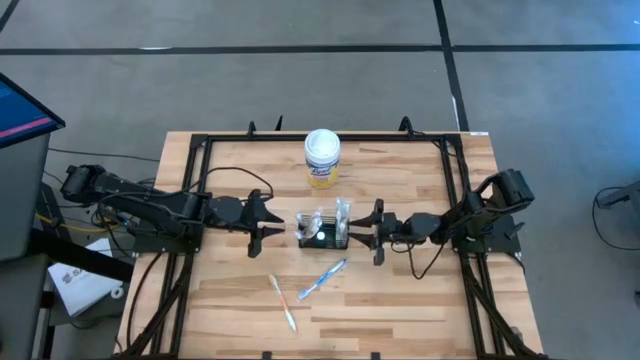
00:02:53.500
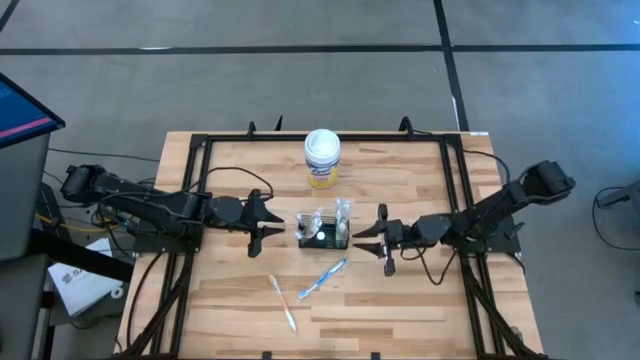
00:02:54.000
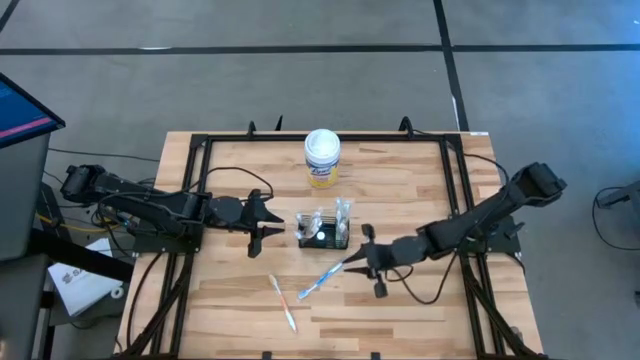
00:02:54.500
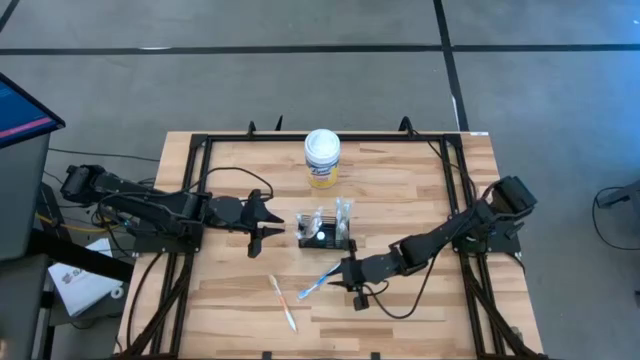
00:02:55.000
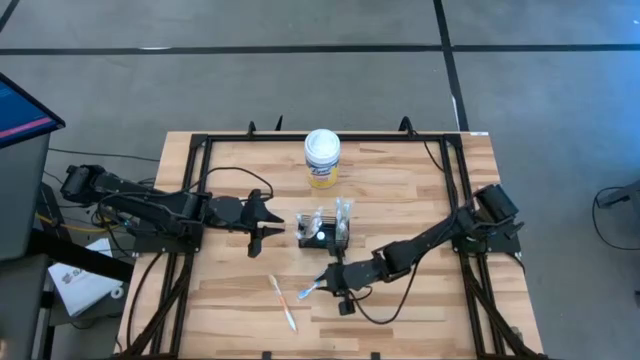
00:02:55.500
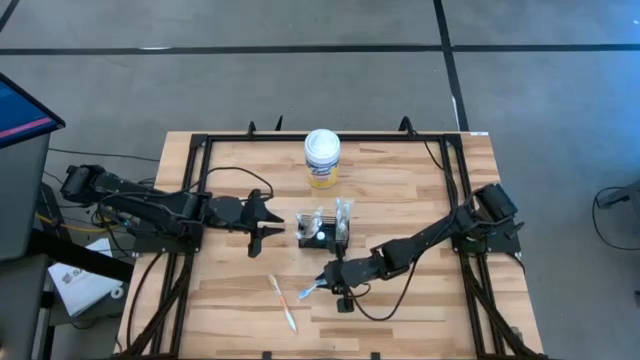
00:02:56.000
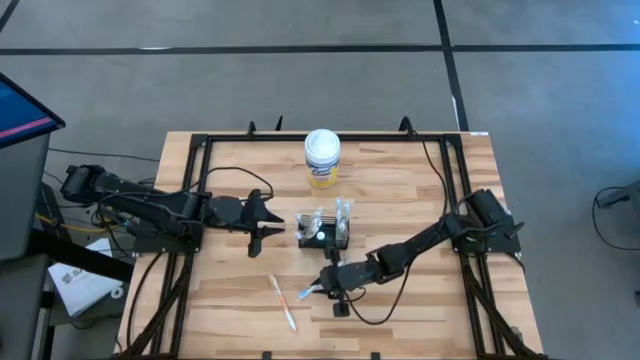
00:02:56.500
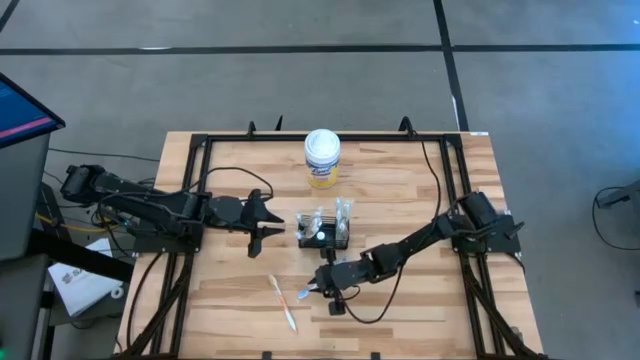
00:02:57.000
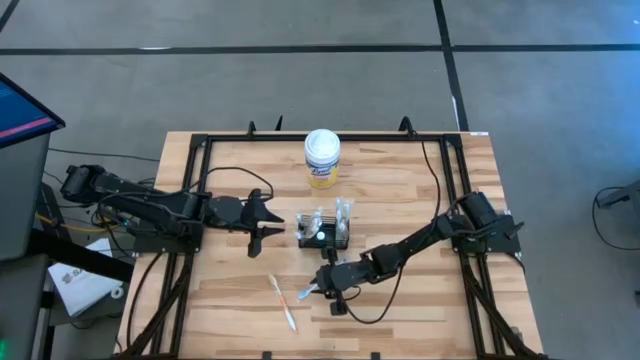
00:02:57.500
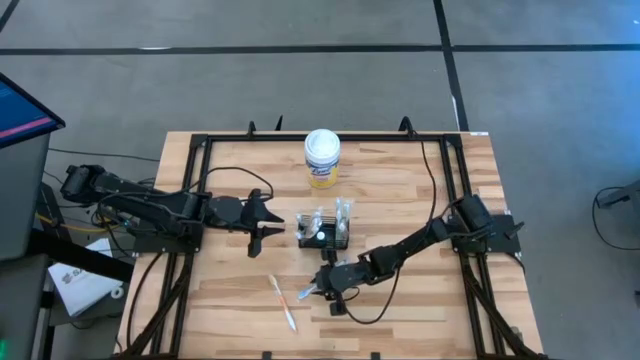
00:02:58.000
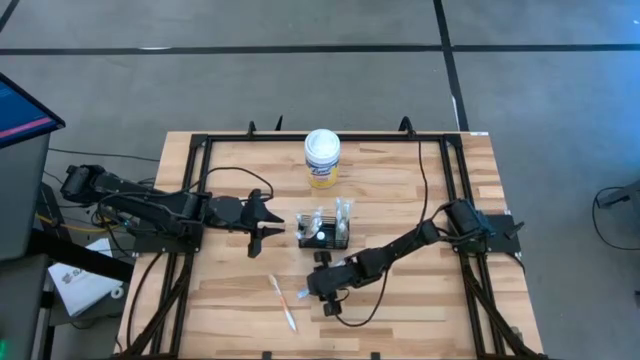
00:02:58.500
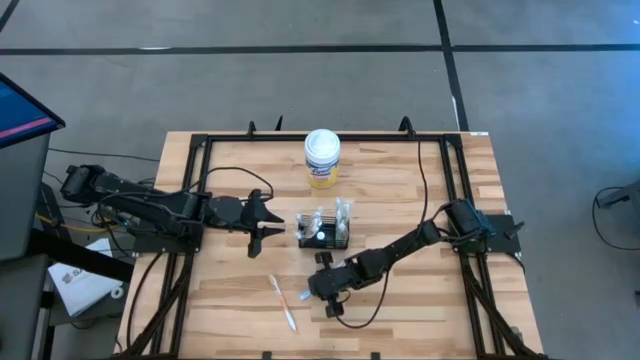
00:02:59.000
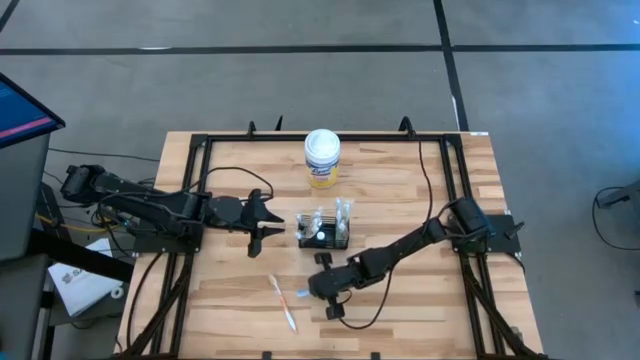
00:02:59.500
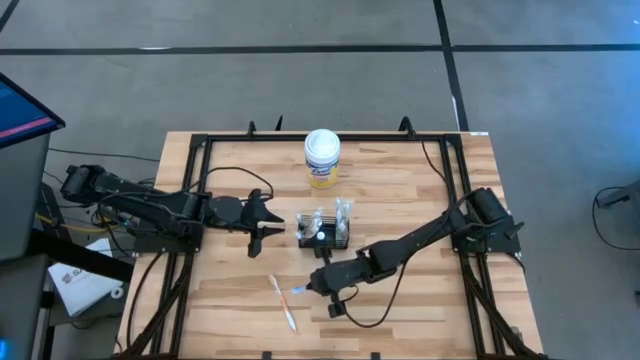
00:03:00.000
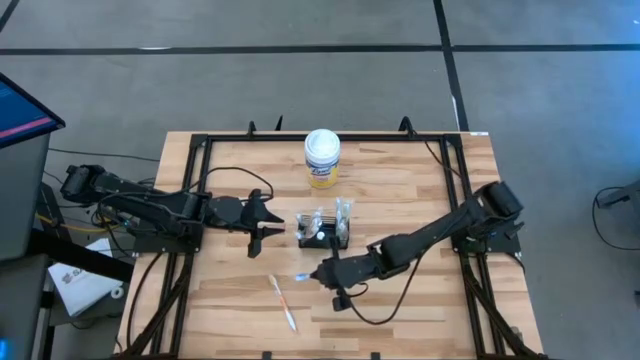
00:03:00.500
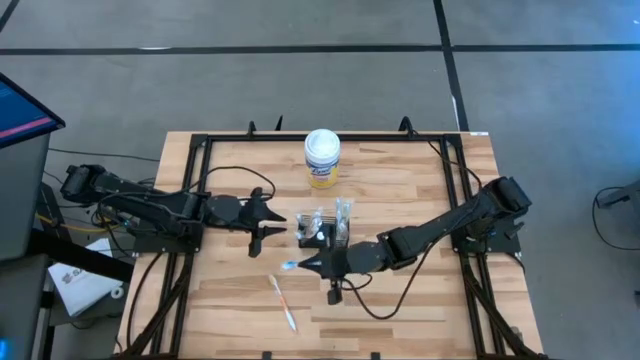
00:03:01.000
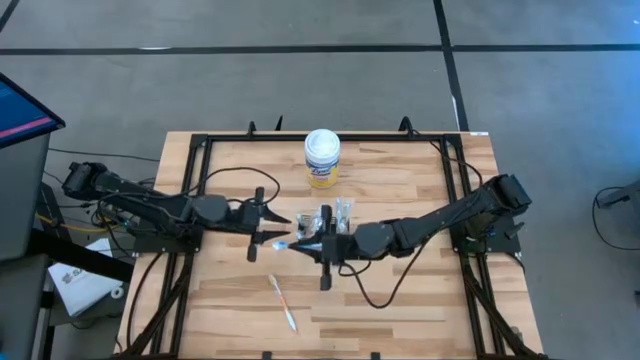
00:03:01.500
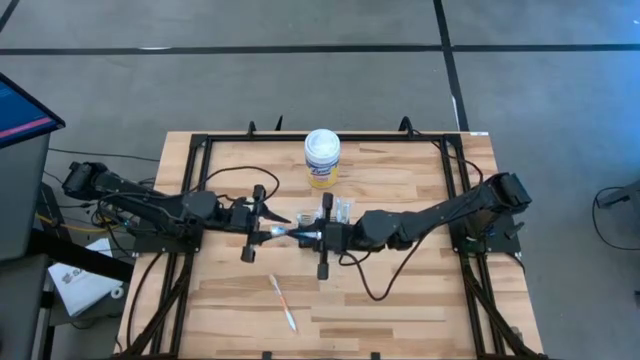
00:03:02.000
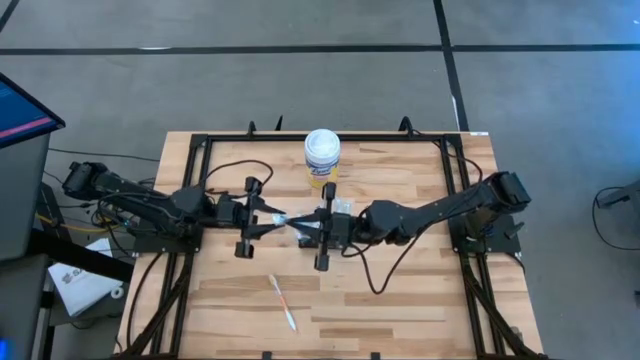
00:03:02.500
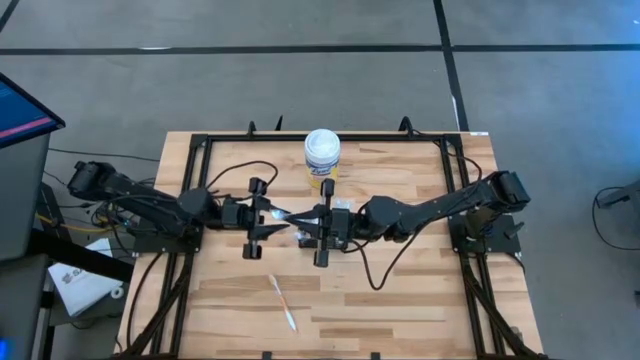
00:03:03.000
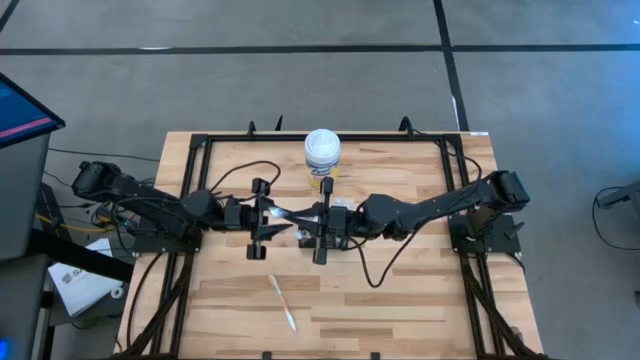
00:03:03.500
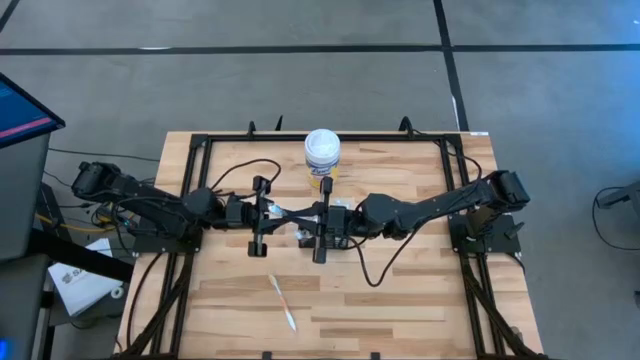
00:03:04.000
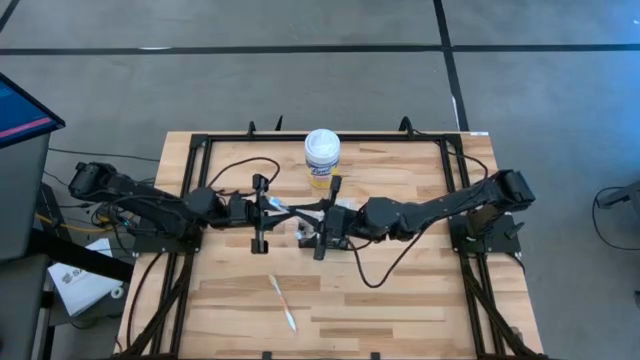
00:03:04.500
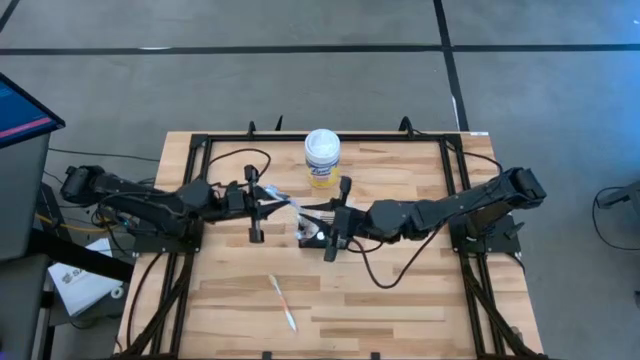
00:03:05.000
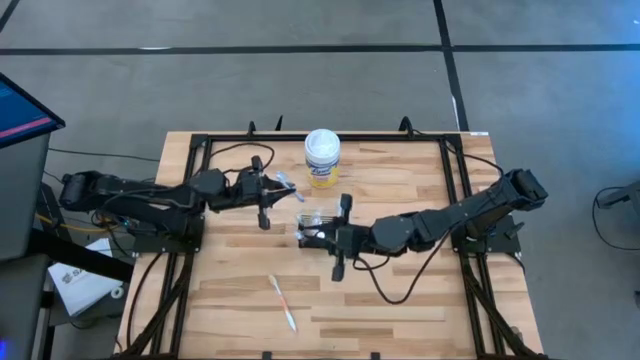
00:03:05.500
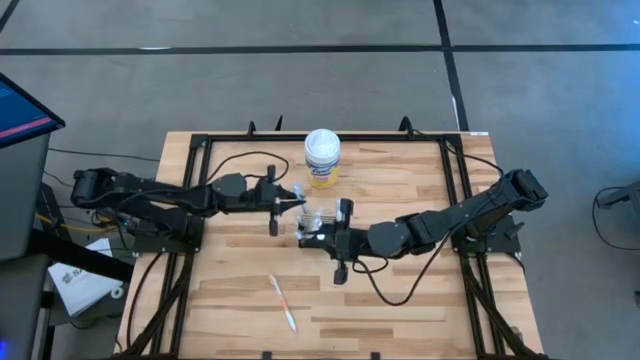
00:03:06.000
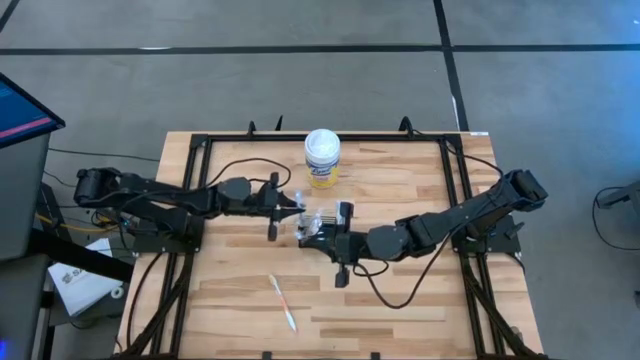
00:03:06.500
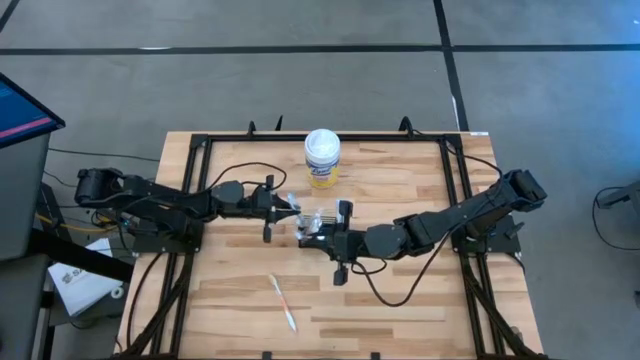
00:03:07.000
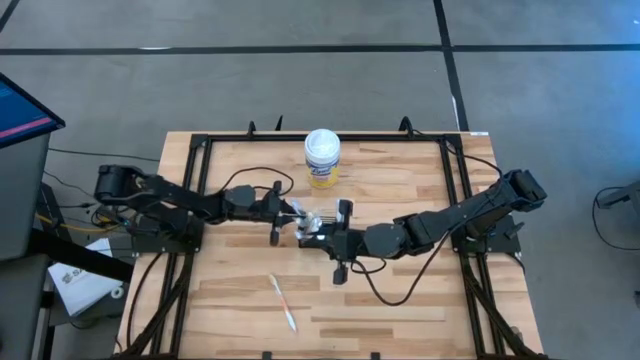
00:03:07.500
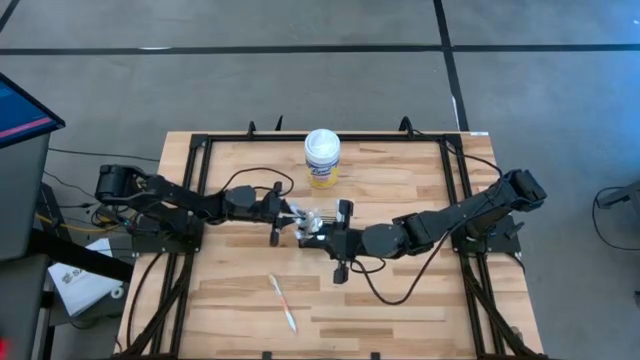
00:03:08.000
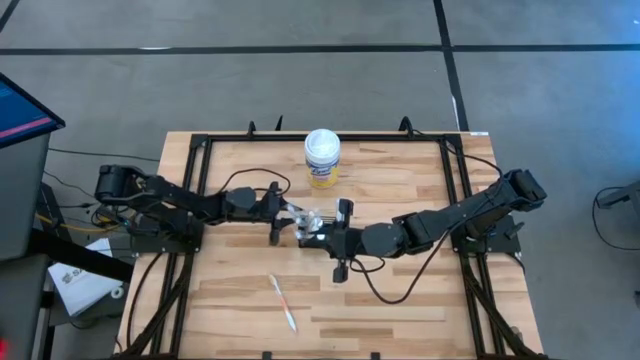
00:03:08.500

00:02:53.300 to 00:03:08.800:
Task: Pick & Place toothbrushing station
Put the blue toothbrush into the black mesh organizer

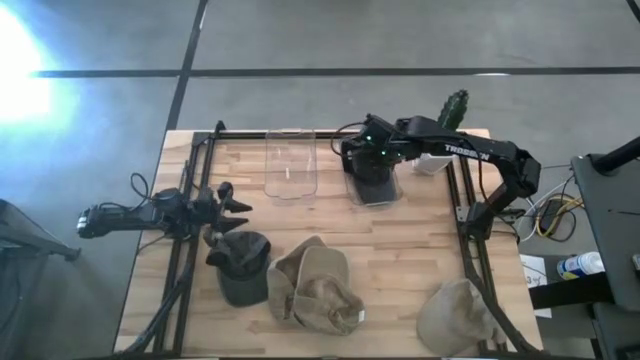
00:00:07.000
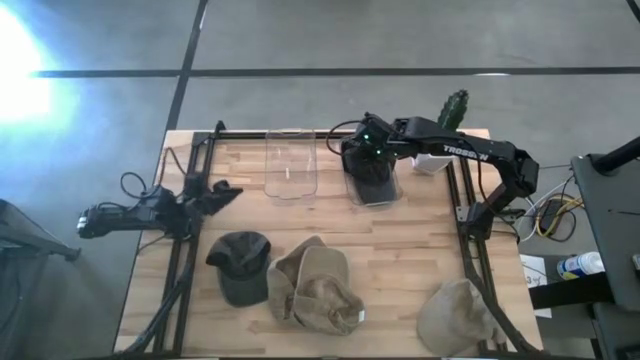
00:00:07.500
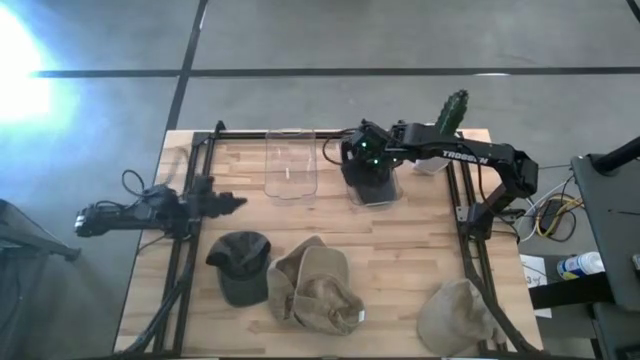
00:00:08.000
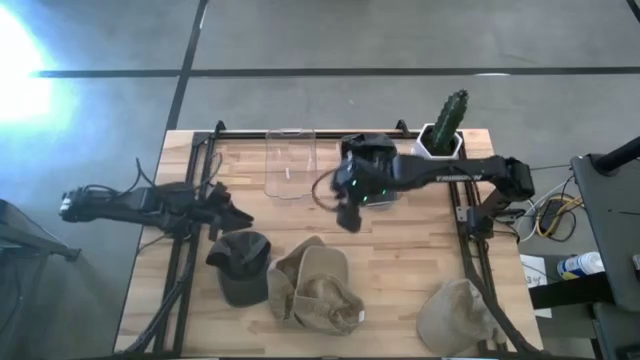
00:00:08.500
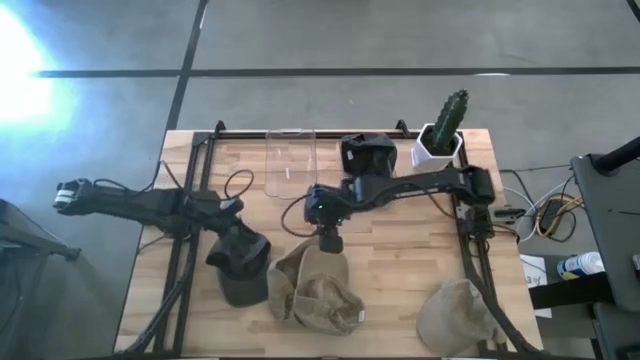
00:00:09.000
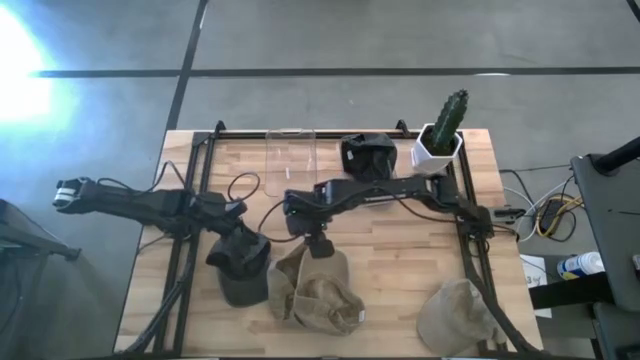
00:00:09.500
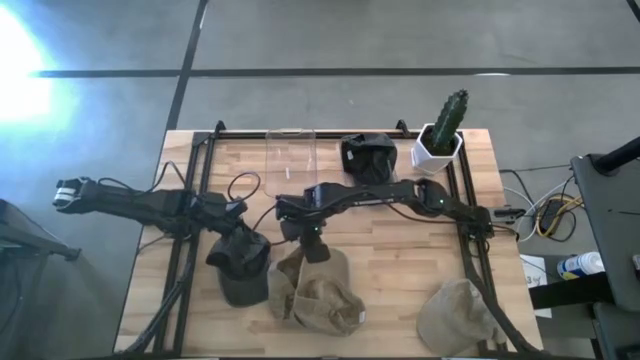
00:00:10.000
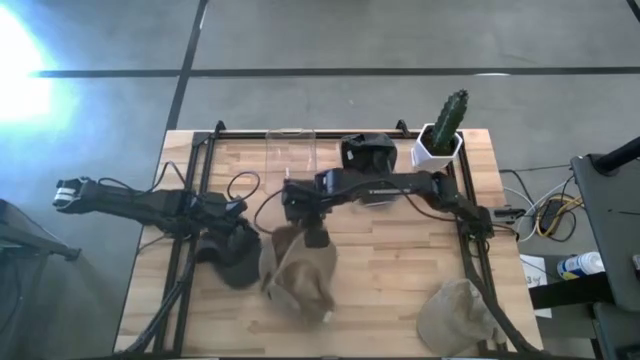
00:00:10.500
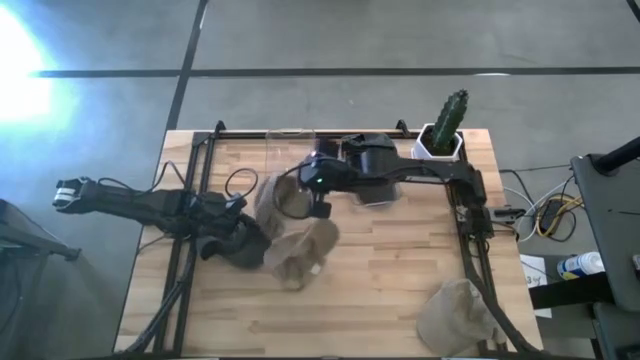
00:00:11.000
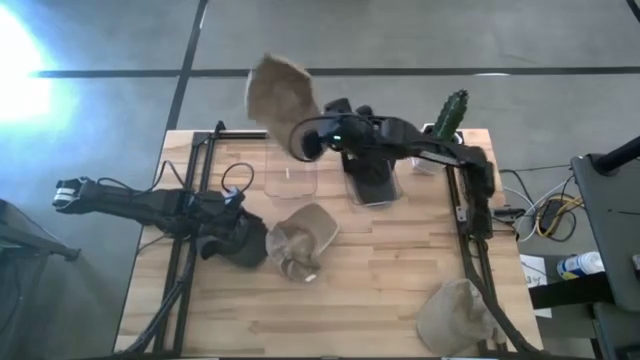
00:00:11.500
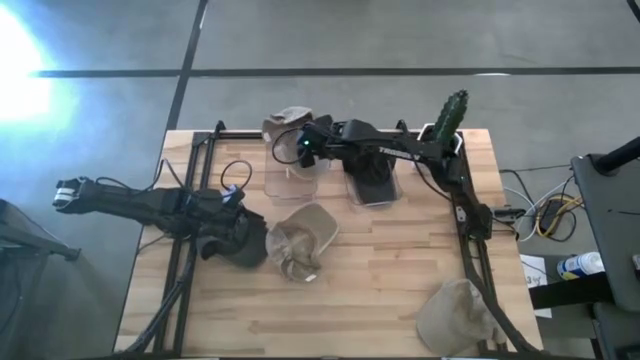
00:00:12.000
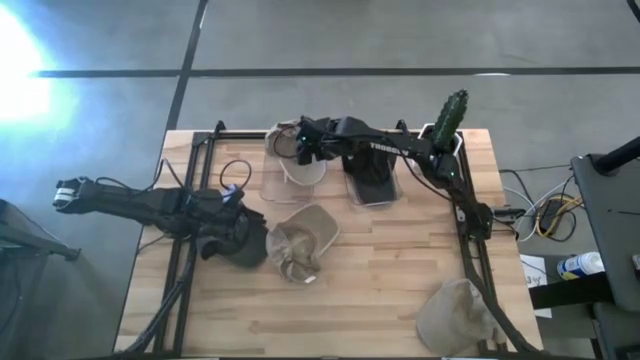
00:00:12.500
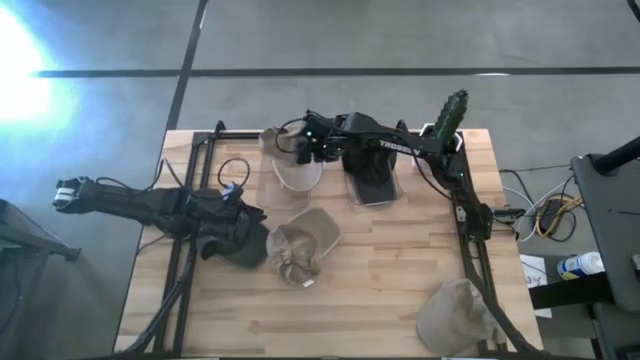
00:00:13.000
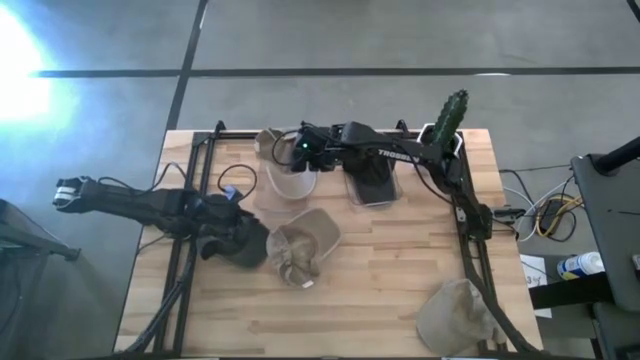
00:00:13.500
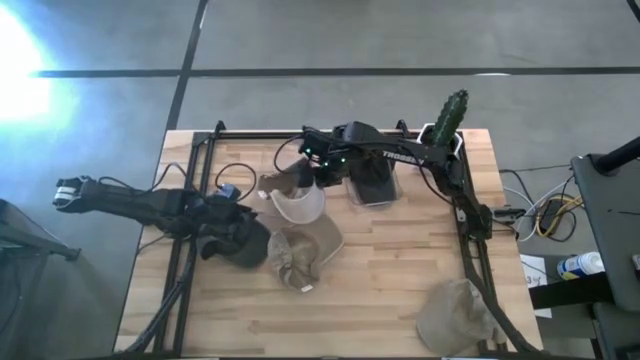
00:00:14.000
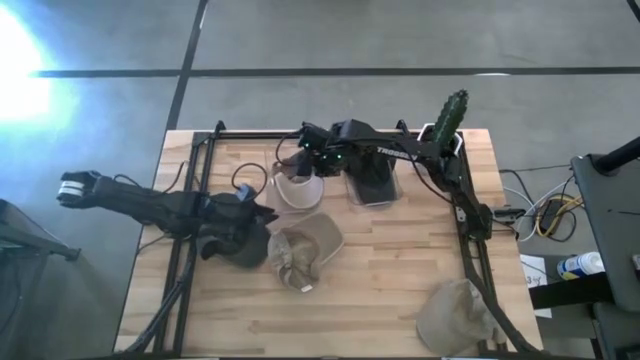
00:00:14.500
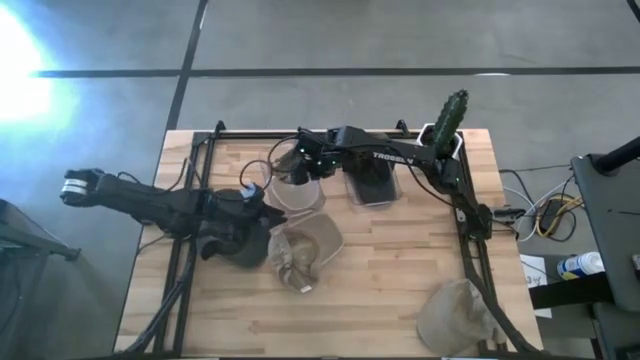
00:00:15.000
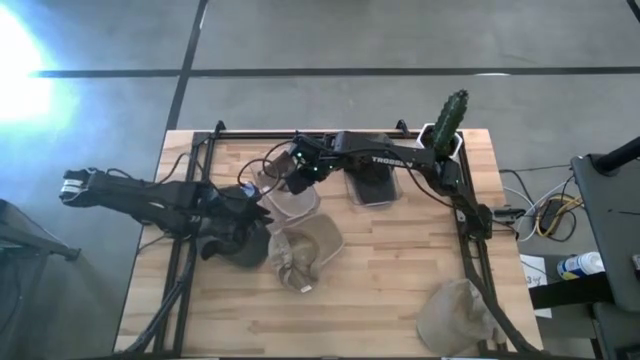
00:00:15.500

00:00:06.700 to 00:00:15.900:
Task: Pick & Place hat
Put the left brown cap into the left transparent bin
